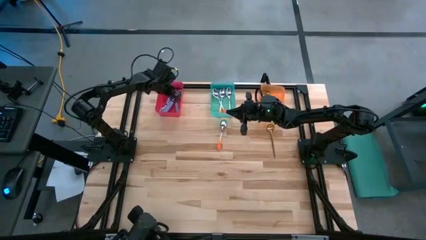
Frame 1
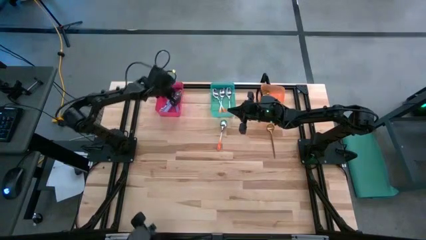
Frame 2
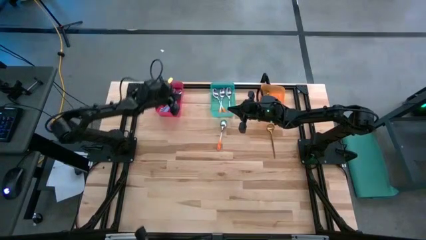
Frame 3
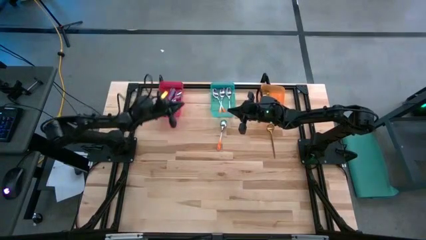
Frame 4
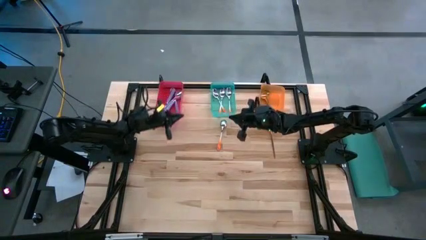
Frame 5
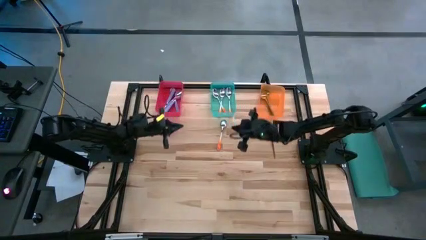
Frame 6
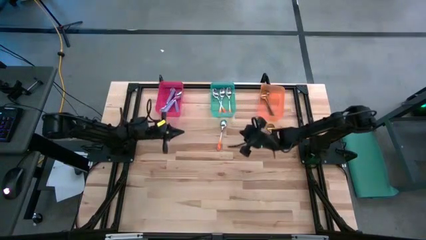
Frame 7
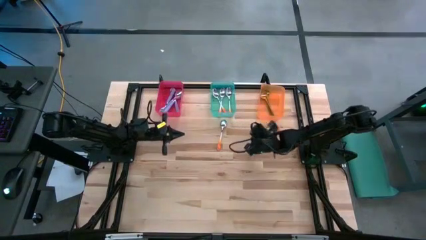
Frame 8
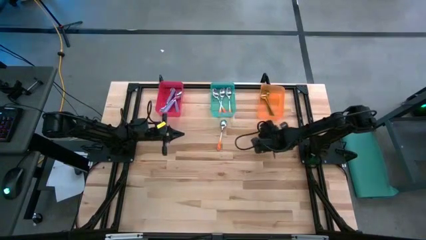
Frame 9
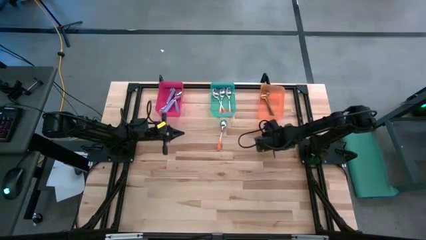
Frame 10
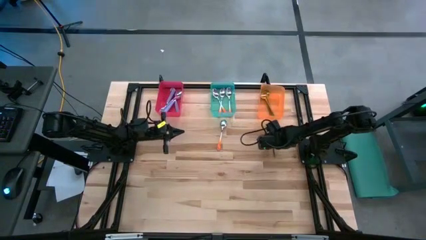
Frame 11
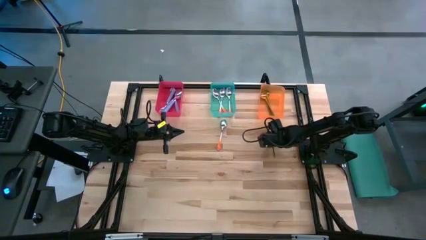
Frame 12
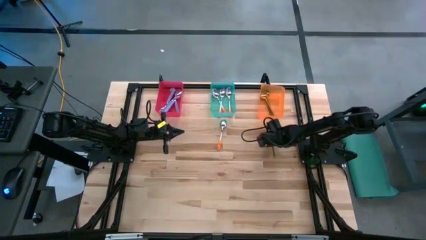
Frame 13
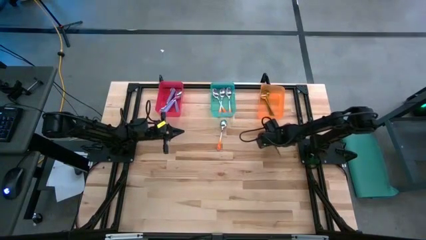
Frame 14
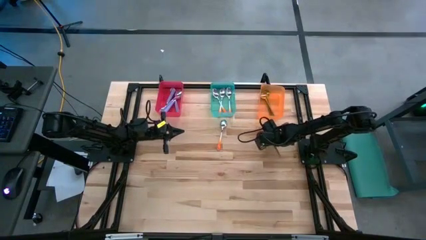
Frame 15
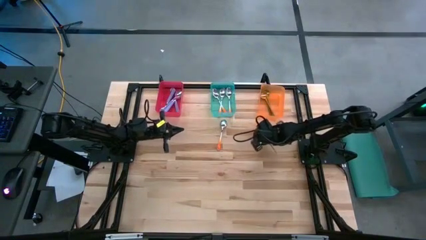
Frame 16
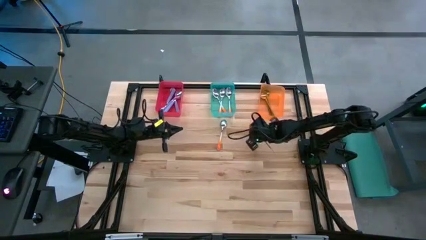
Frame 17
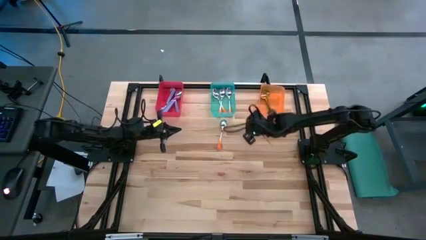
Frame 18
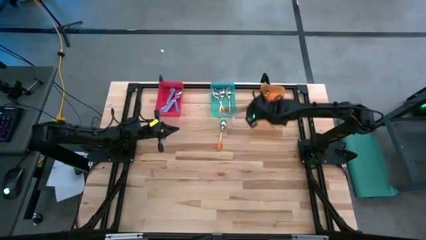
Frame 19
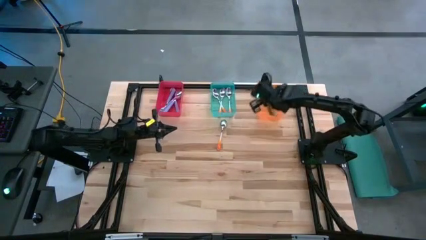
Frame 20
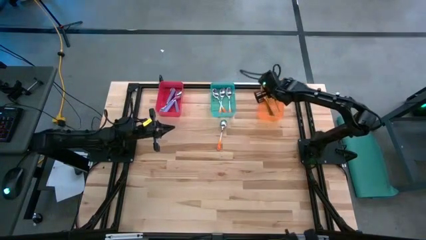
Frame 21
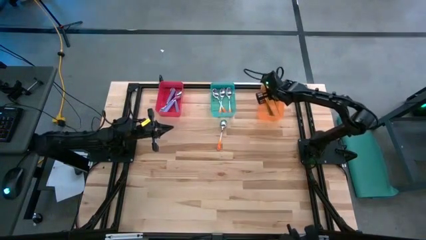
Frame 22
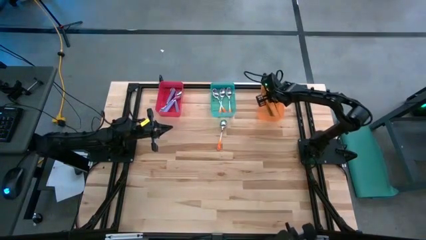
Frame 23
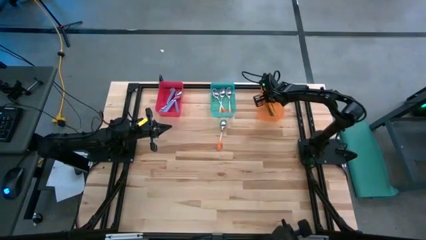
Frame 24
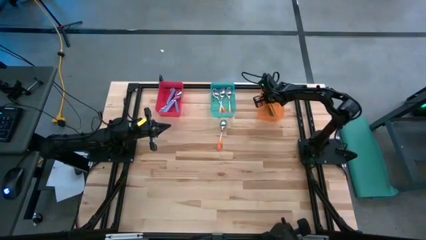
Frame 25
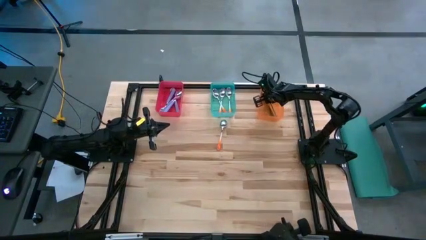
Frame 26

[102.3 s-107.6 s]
Task: Sort silverware by color (type)
Put the gold spoon into the orange bin

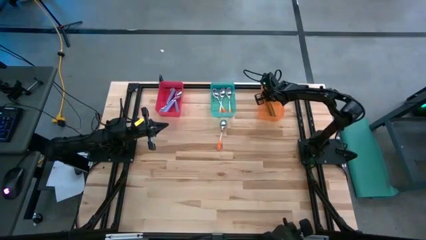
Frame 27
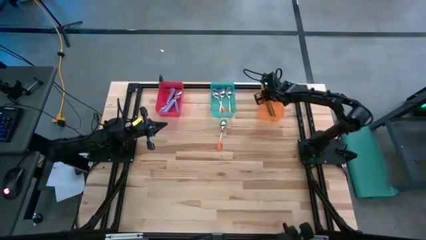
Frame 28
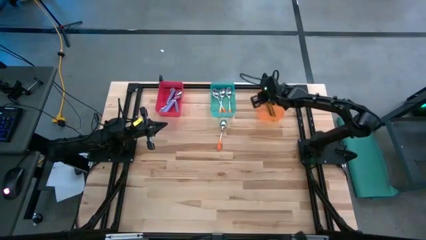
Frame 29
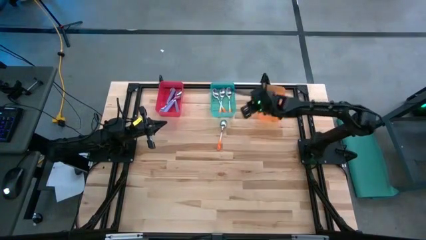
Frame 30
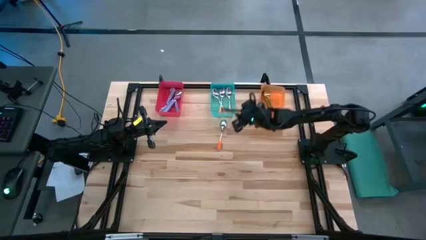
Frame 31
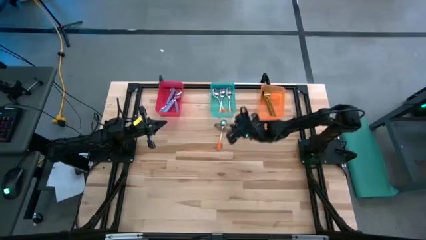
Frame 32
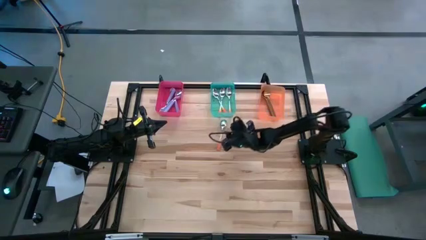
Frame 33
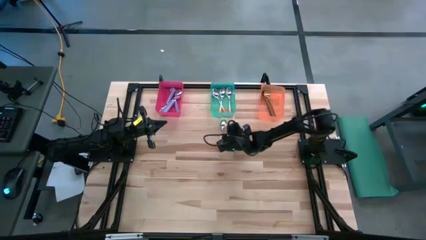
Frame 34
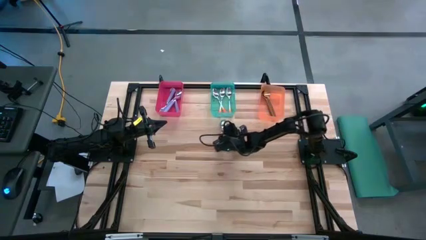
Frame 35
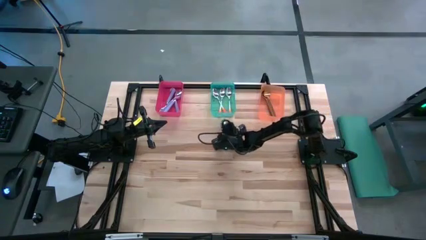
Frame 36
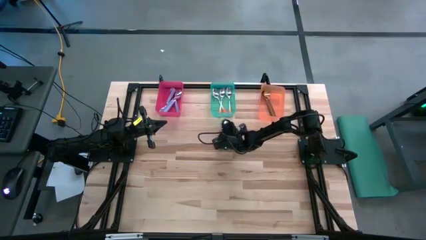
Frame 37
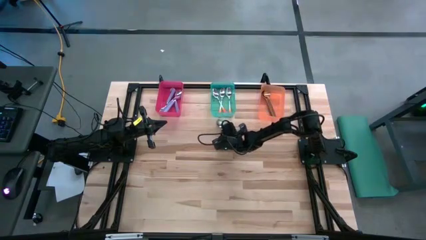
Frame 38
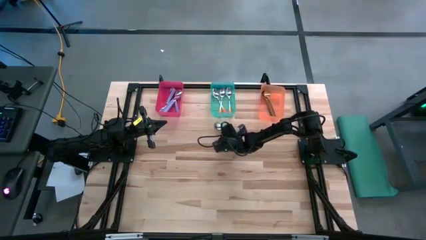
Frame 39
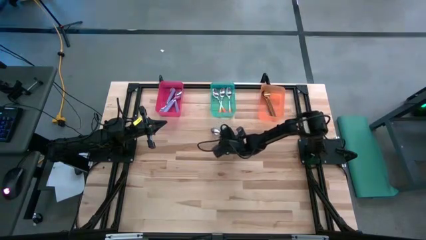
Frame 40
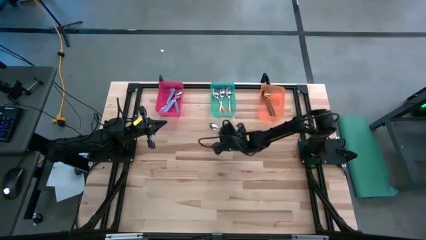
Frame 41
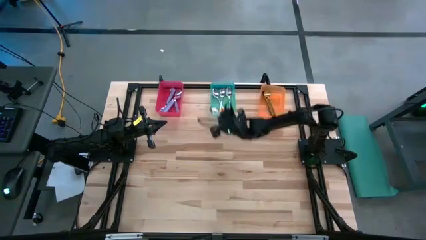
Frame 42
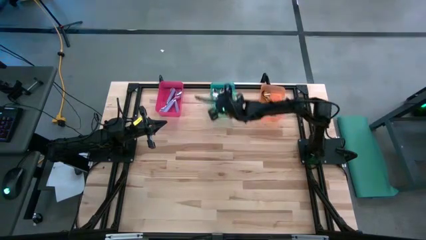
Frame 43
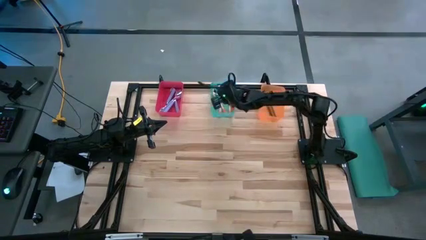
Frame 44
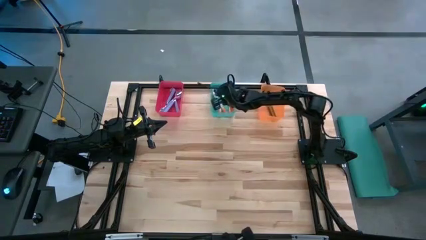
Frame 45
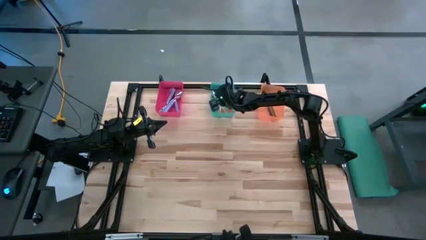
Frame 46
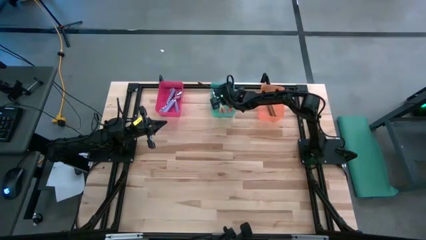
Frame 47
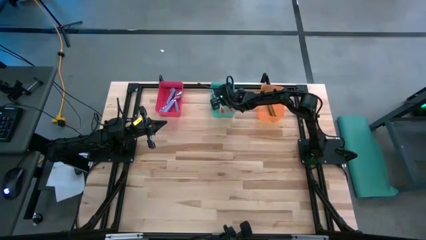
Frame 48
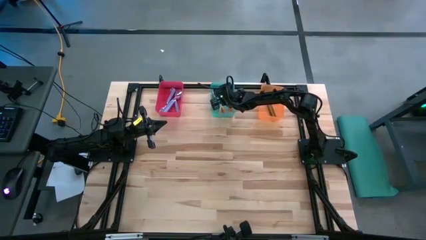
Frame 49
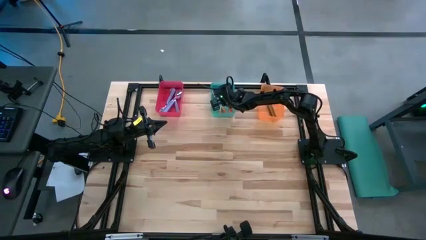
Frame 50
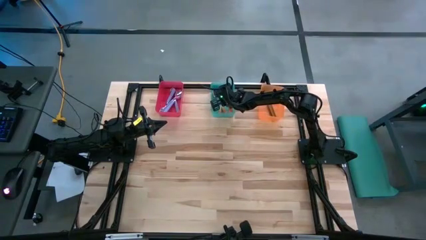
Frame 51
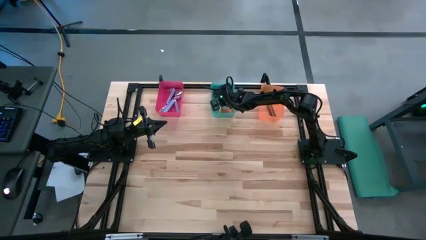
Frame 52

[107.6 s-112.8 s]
Put the orange spoon into the green bin

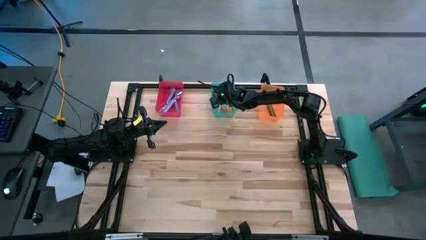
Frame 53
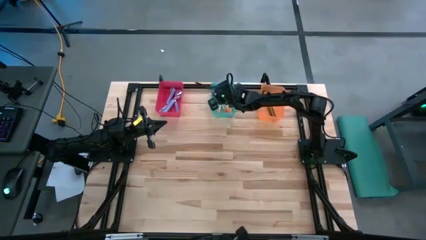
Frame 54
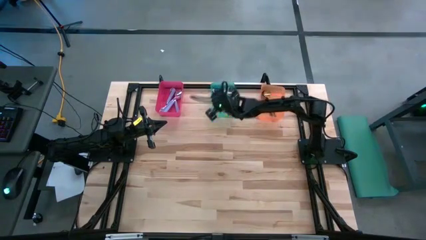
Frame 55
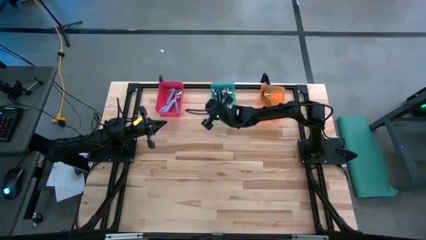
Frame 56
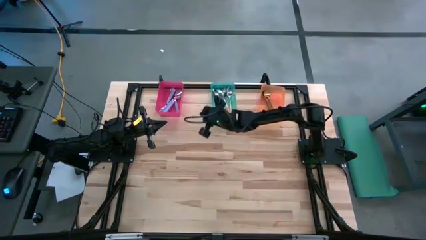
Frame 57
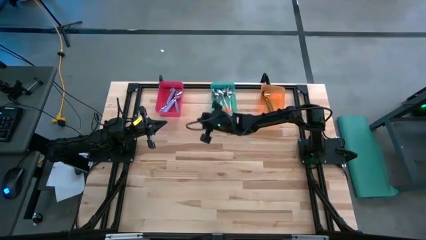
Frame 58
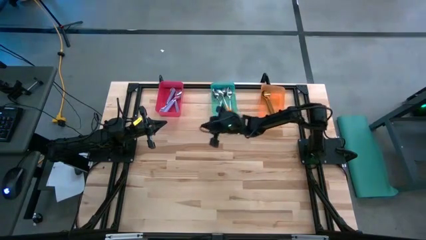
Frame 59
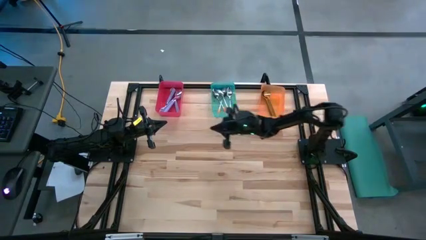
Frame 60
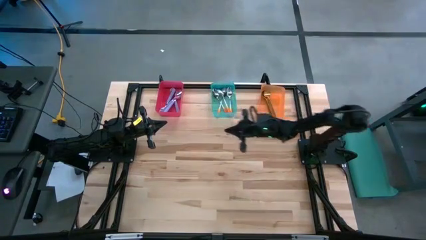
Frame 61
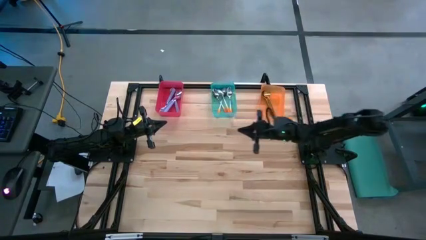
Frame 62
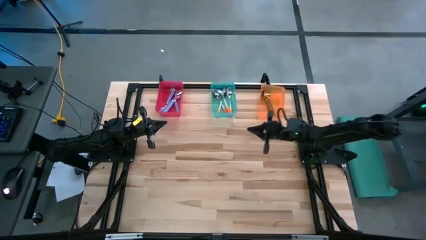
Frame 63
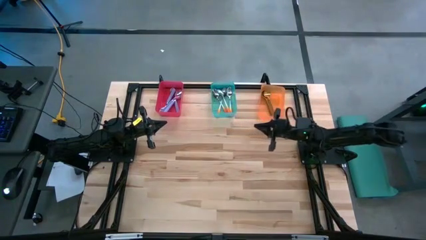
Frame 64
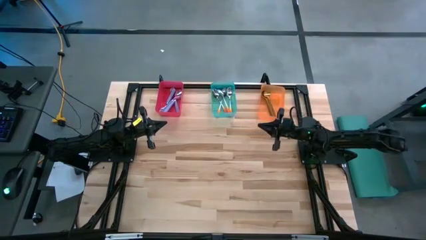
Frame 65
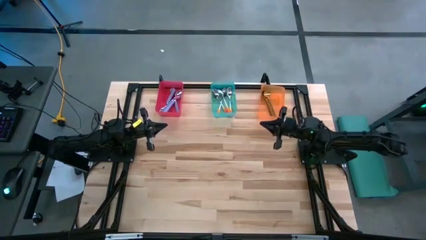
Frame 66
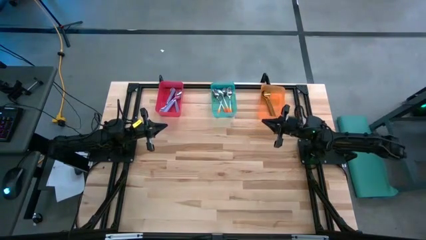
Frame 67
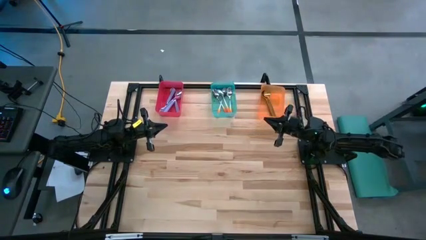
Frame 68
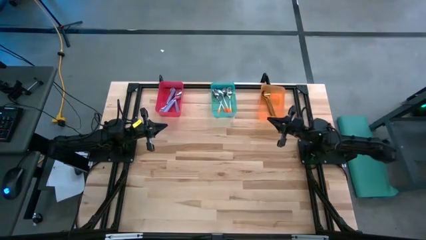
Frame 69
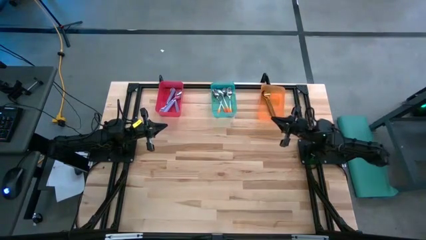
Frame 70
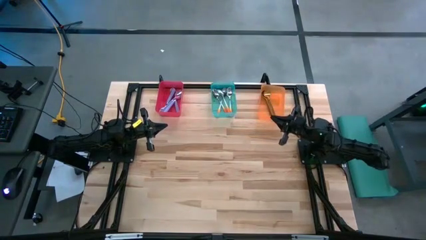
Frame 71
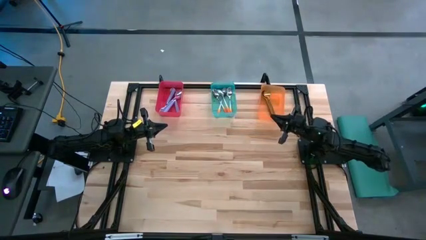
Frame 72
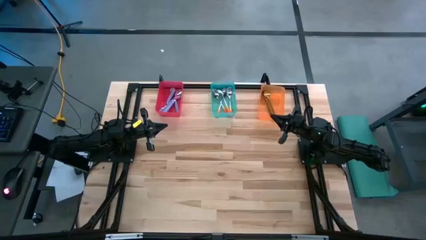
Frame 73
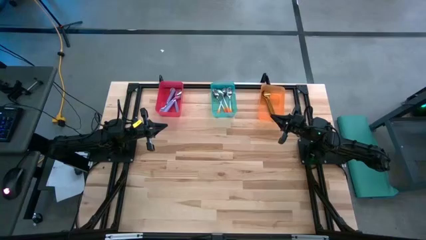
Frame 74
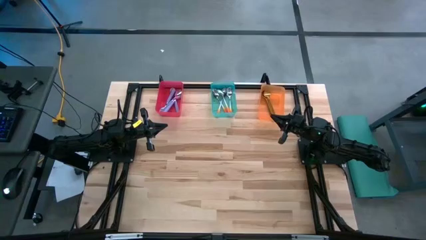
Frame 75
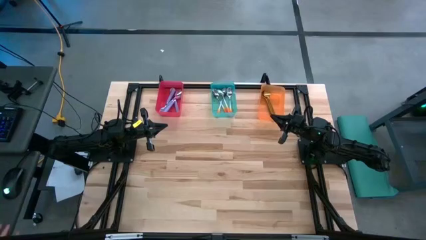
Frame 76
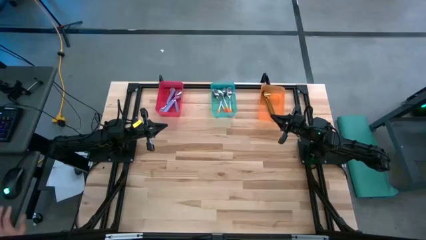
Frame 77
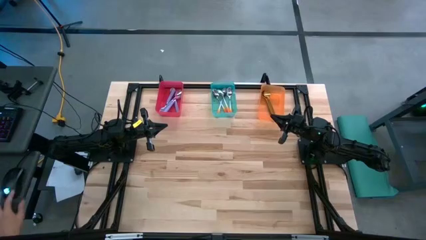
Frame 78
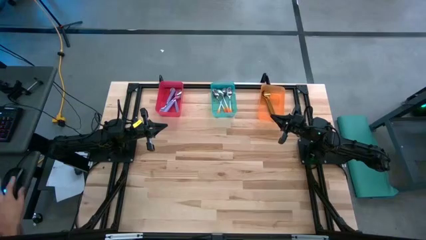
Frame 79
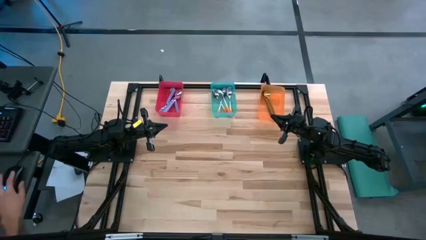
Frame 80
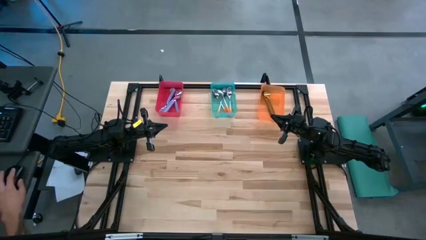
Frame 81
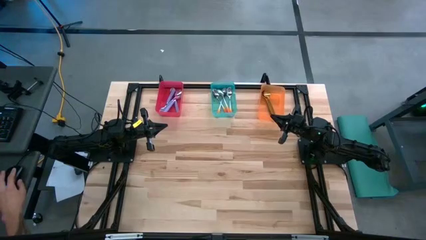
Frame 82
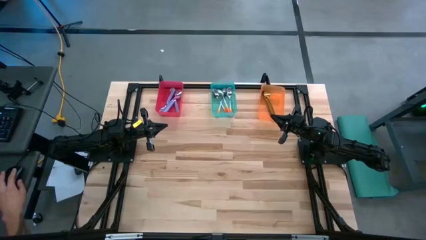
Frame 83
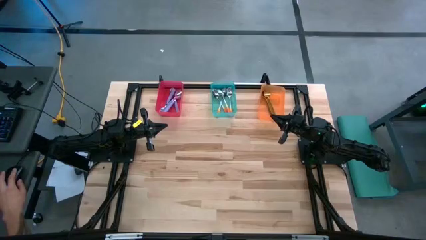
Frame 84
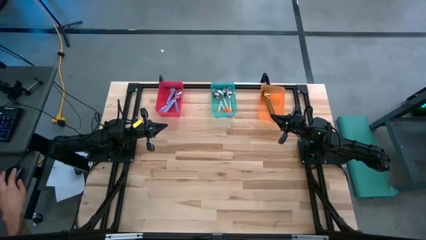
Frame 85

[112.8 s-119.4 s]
Return to Home Position
